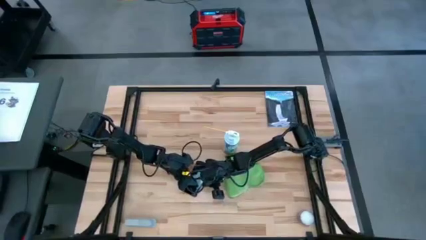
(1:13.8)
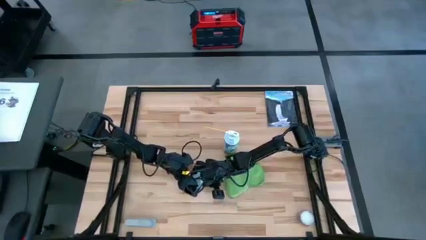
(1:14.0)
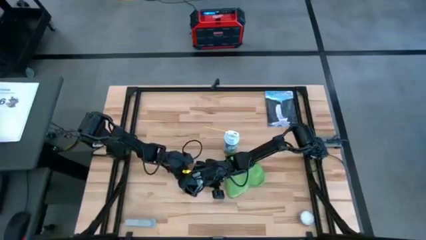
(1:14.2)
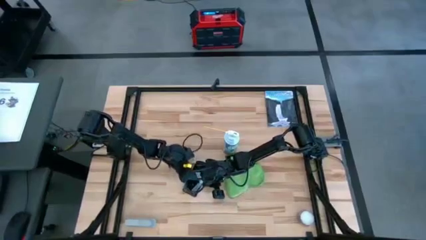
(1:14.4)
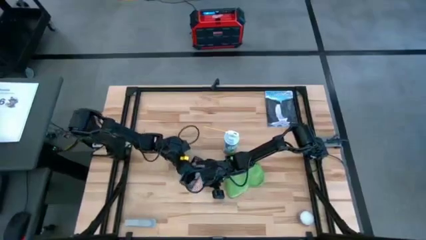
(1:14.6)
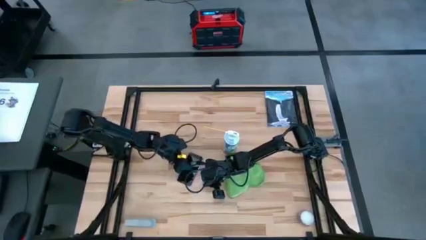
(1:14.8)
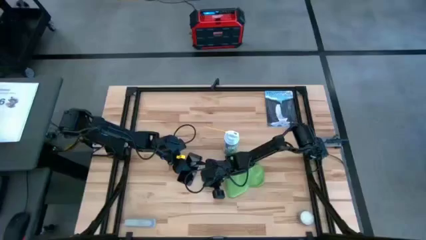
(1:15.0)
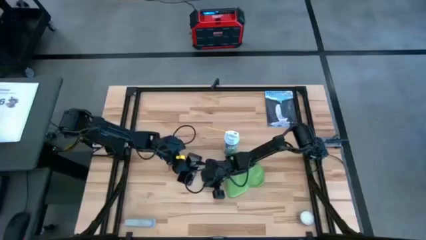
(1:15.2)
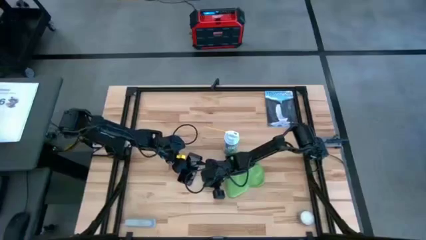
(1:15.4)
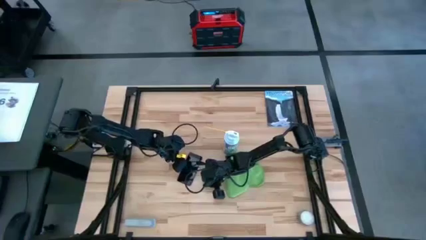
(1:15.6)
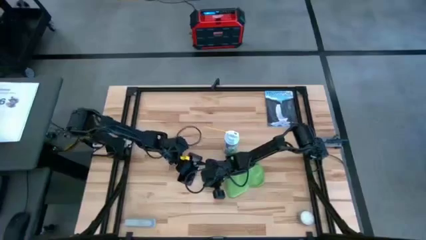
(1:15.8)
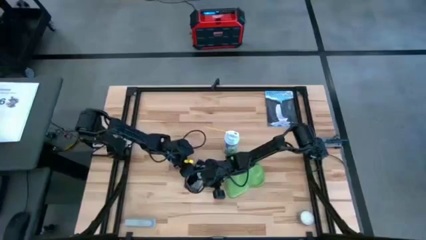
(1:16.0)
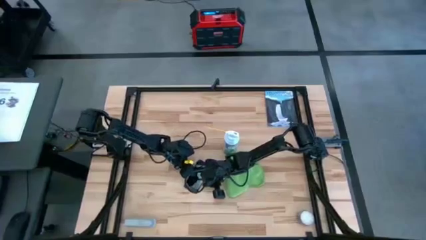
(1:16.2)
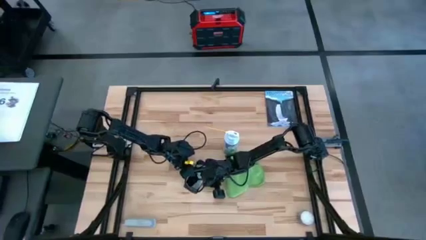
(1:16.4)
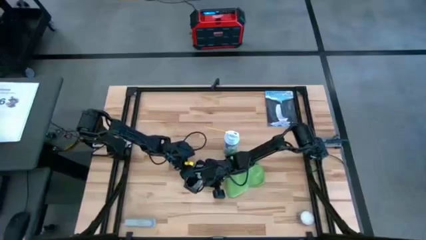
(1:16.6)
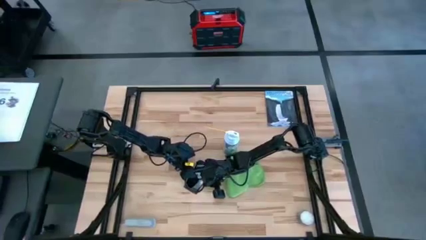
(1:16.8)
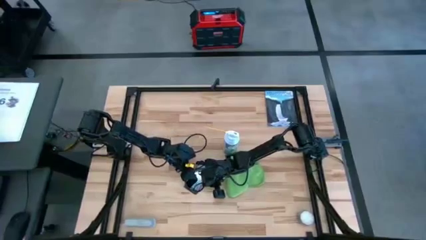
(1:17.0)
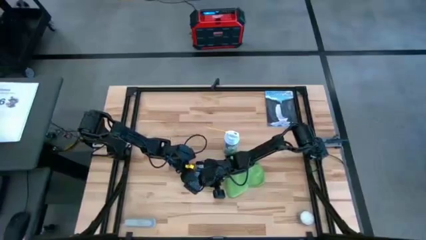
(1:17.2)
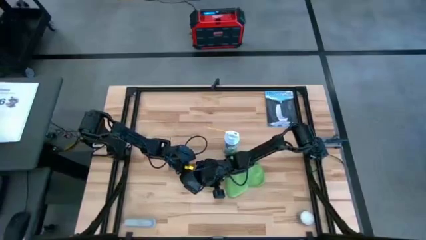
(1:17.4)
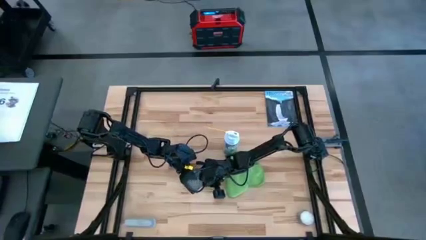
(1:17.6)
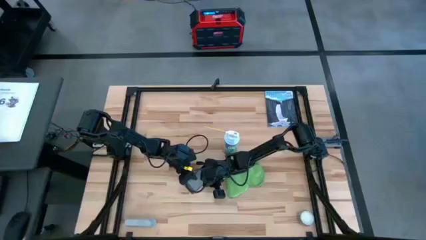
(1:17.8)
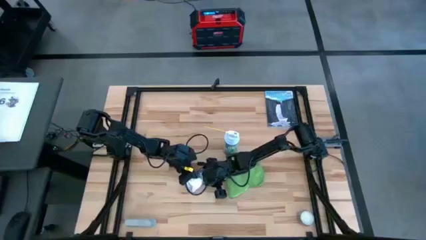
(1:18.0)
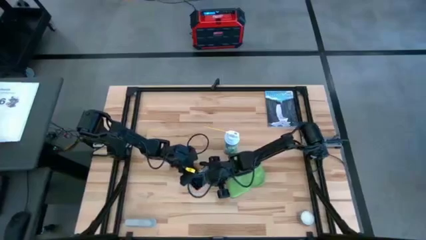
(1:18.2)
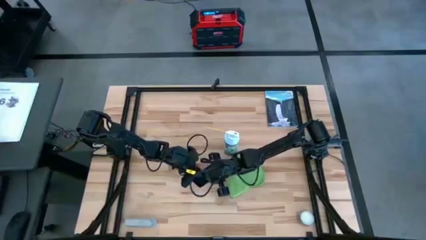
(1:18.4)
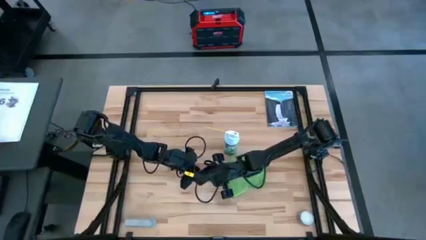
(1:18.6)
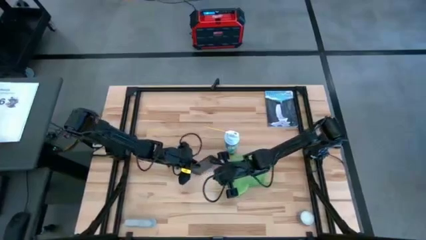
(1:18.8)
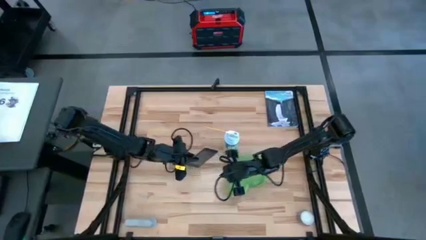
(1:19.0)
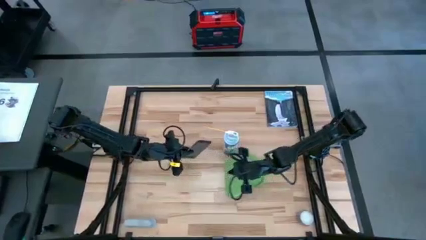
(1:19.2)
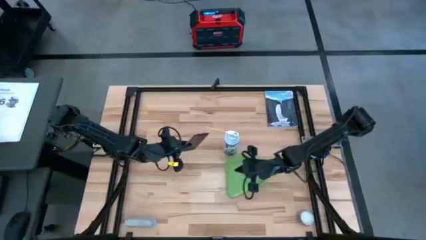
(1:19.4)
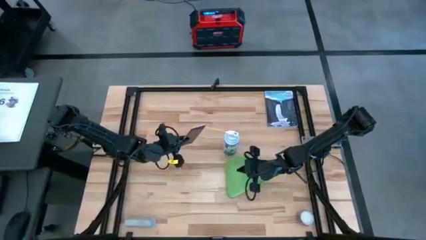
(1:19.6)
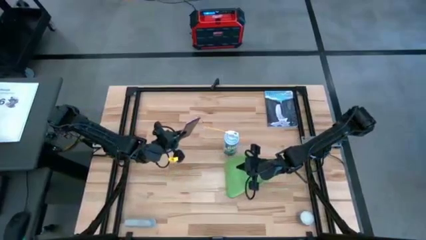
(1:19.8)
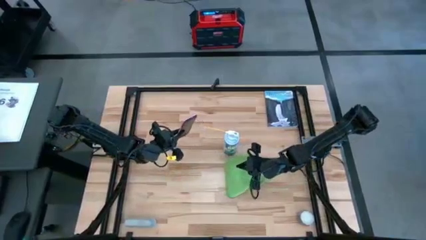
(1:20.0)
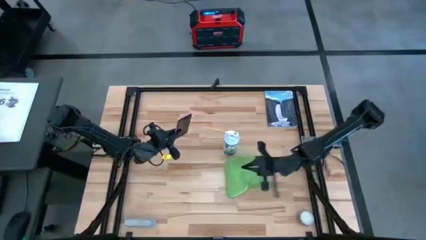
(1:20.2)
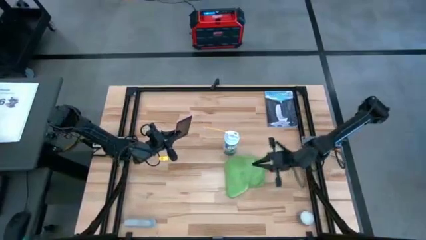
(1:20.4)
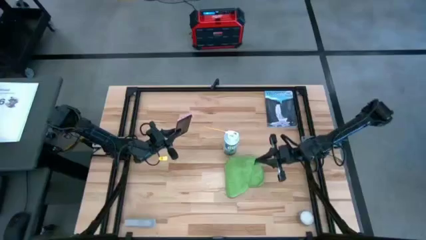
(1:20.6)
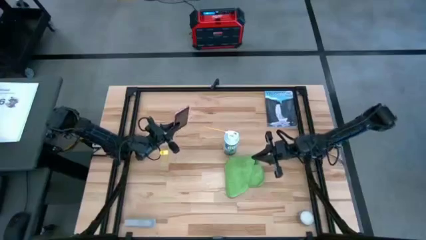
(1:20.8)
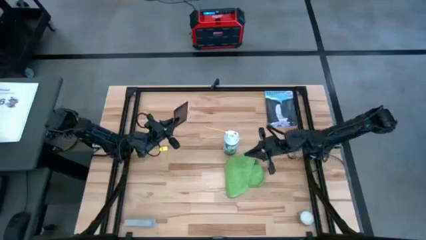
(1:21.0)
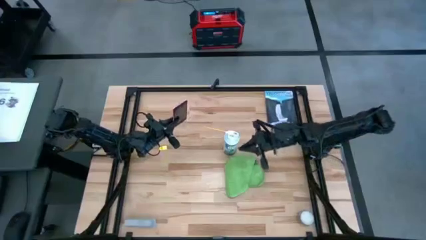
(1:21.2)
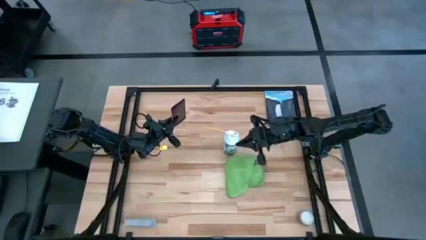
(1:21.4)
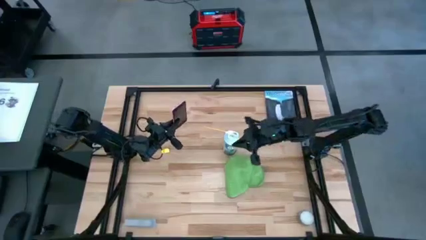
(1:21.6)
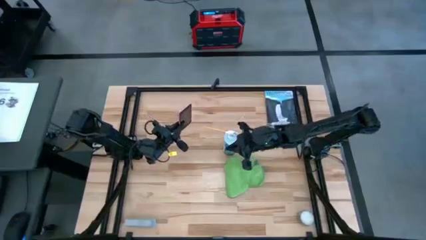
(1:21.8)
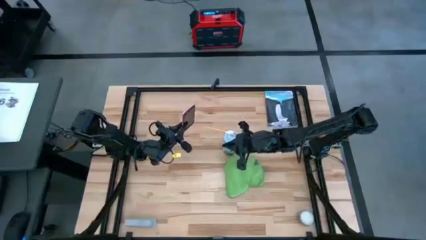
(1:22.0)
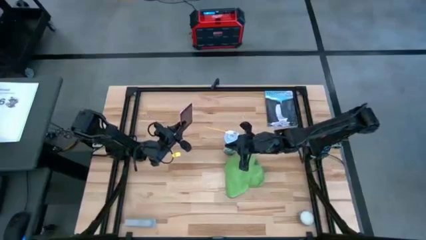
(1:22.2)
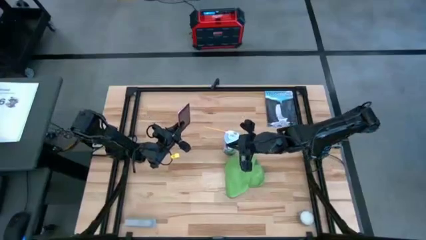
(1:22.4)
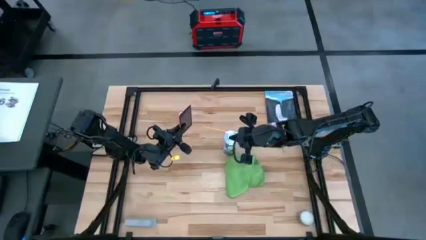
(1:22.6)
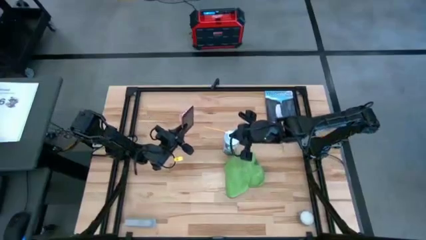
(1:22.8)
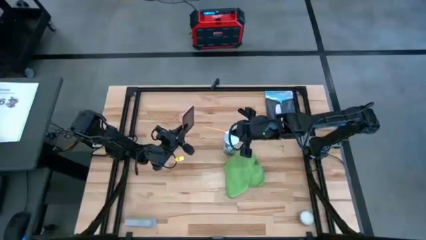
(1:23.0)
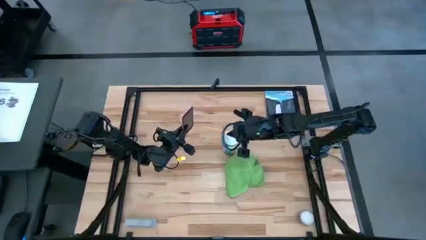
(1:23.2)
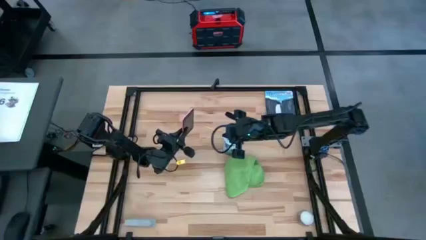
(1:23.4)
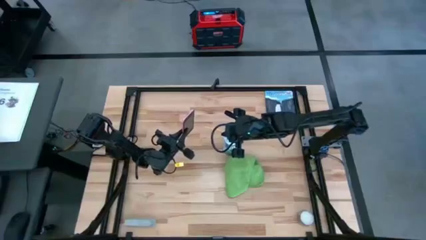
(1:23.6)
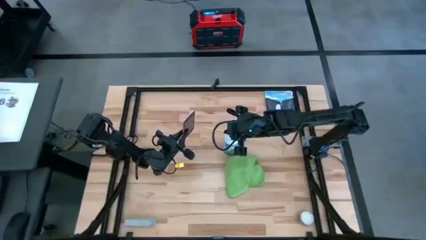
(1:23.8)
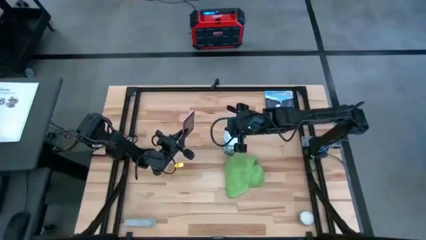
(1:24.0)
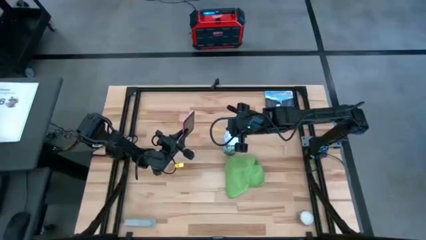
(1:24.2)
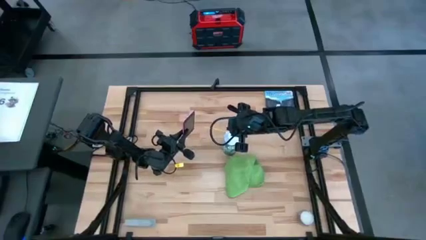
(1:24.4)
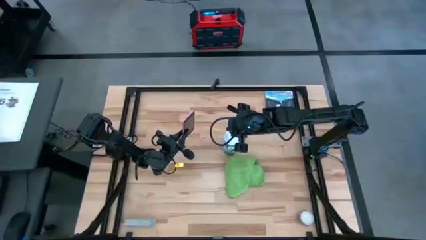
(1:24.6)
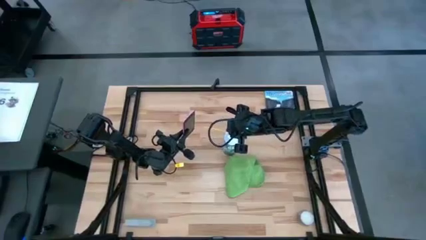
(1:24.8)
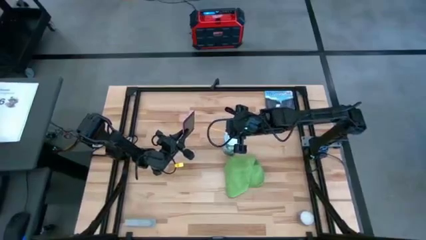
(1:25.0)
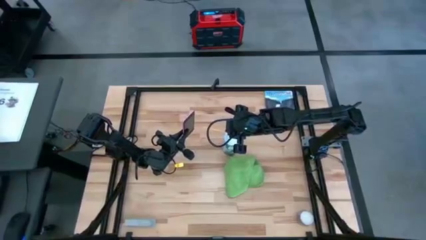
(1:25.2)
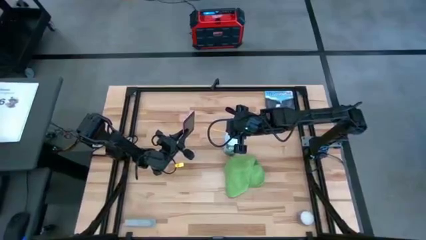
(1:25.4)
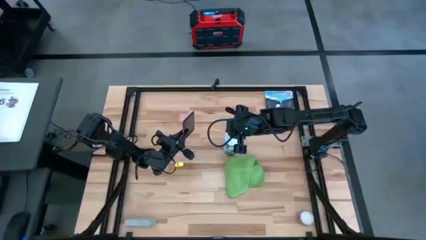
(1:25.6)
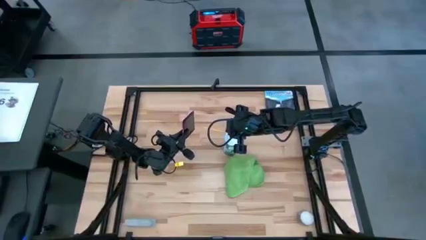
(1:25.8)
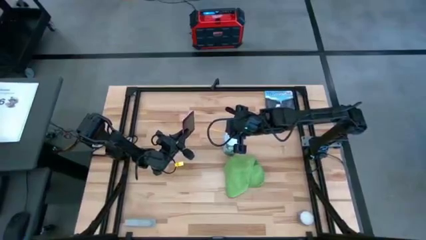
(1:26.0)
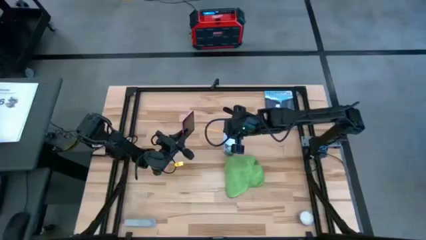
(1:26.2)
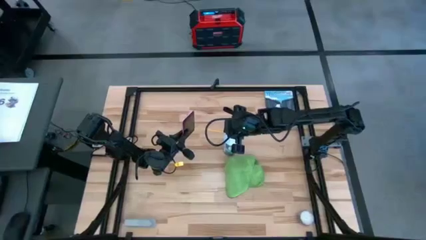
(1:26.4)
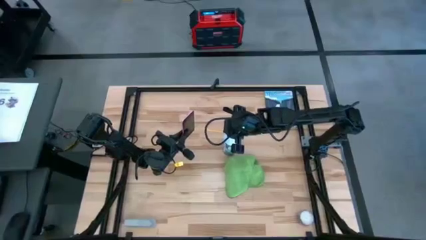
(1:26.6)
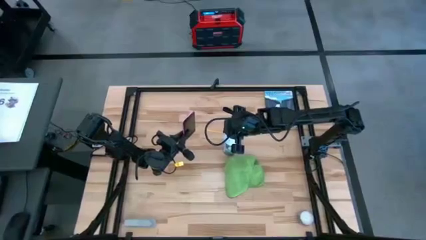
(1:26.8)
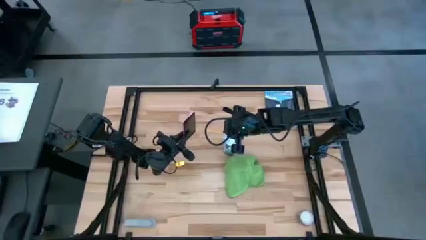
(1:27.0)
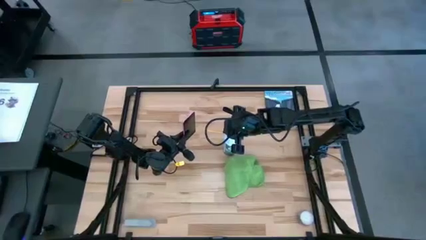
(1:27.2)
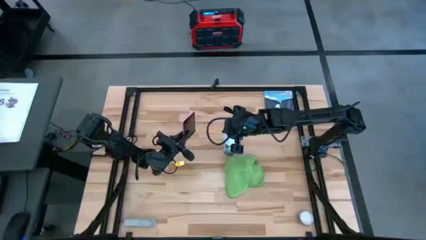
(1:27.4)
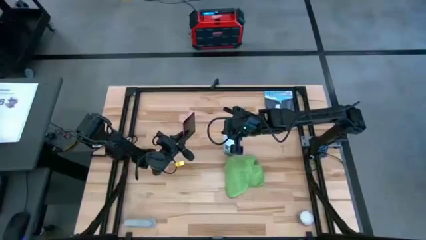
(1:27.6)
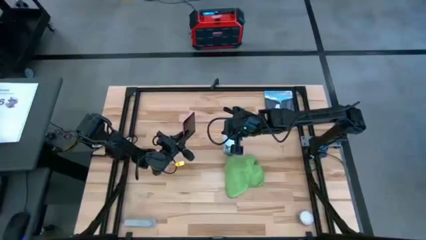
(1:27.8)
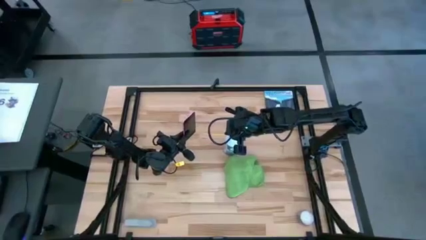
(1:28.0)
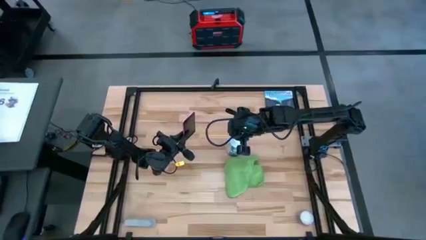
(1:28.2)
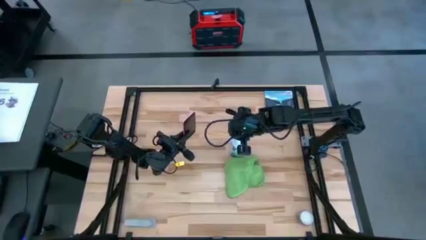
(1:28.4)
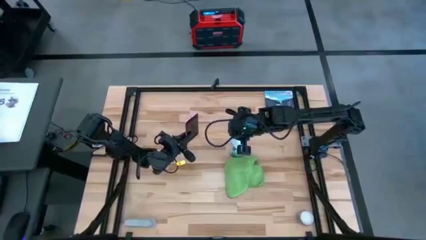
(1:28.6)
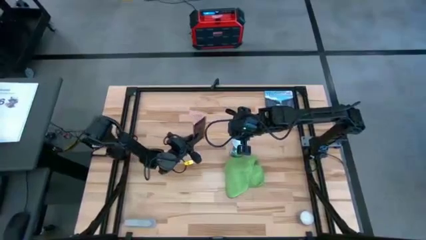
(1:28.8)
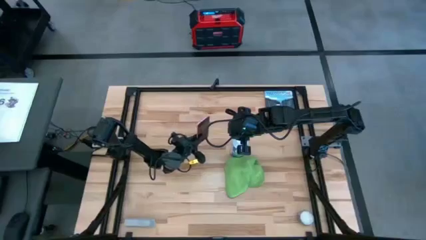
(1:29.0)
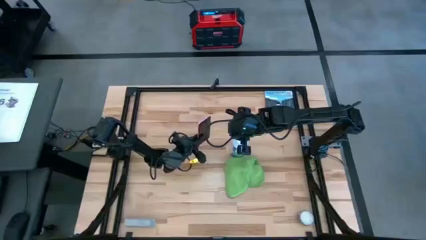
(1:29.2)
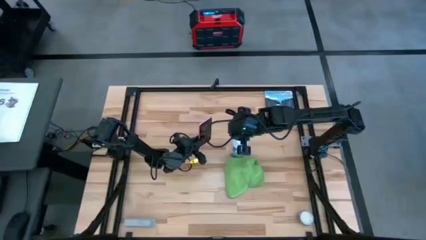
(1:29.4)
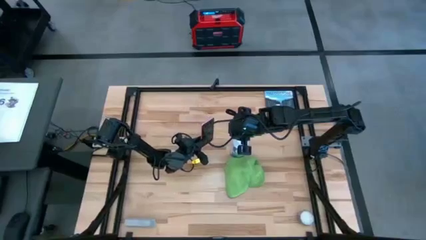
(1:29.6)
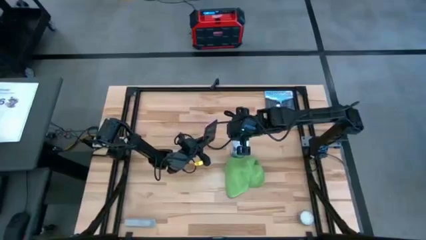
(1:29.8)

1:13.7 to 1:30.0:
Task: Apply microfiber cloth
Spray the front of the pink phone using the white spray bottle

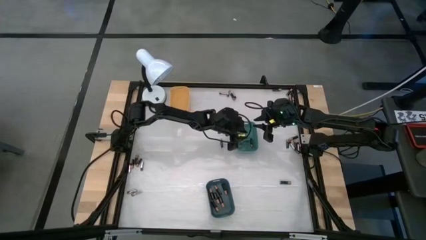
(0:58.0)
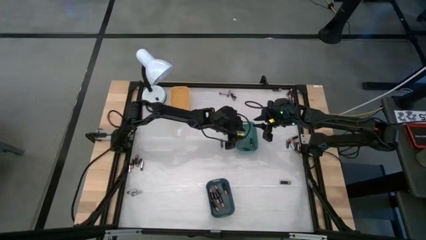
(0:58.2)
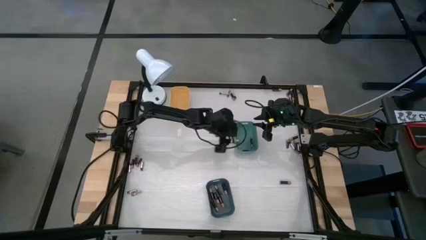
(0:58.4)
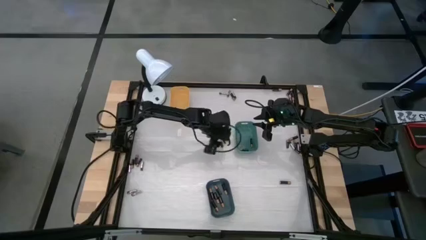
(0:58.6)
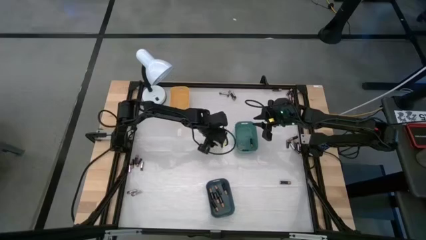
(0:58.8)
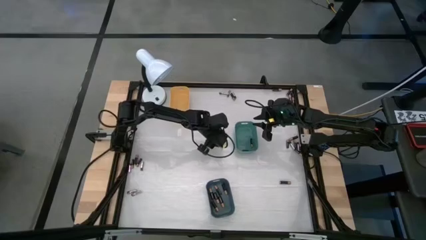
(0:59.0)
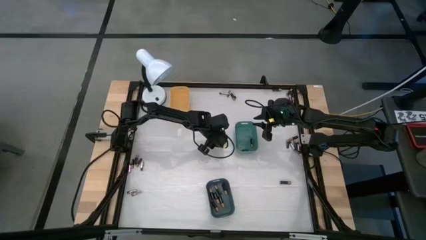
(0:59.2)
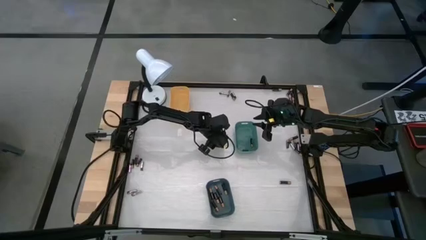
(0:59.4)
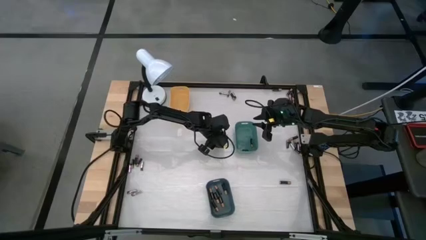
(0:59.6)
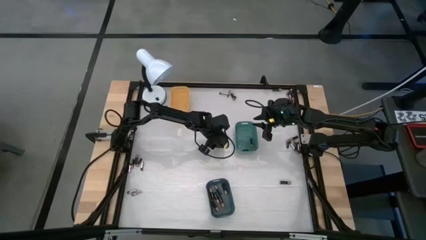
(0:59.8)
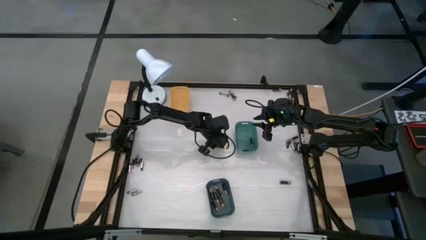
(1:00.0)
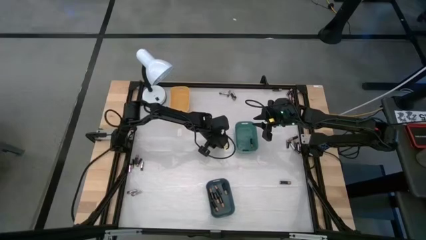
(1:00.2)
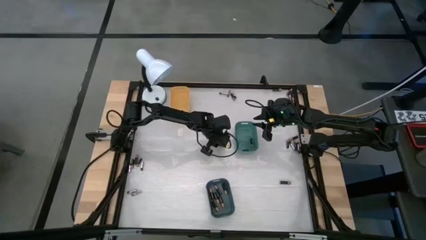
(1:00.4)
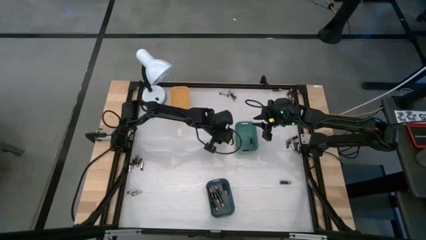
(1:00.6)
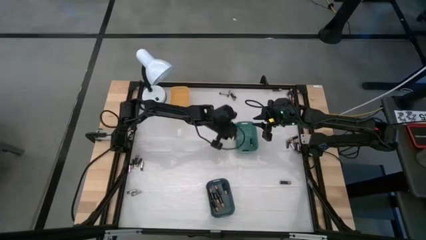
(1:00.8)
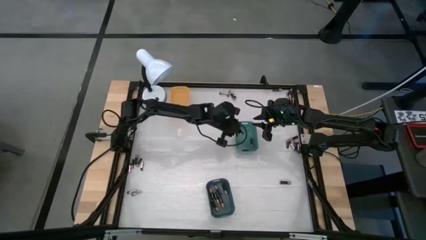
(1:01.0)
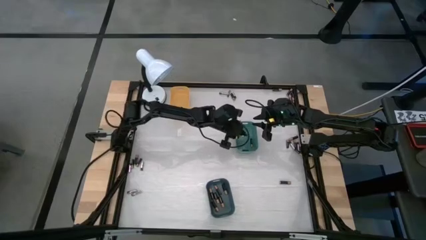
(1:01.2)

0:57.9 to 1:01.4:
Task: Sort batteries
Put the black battery into the green bin
